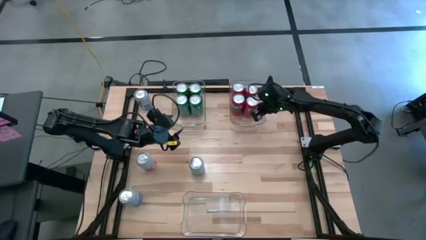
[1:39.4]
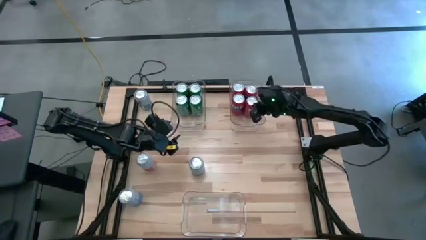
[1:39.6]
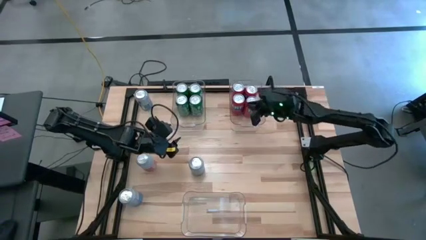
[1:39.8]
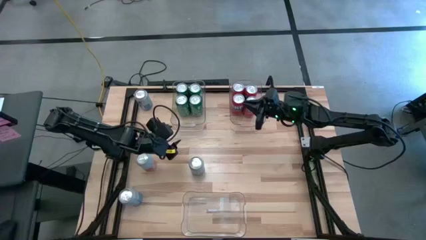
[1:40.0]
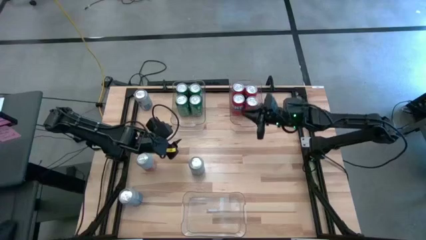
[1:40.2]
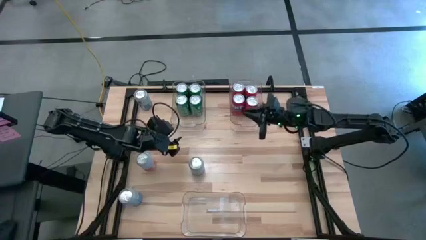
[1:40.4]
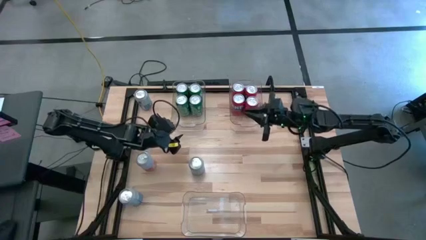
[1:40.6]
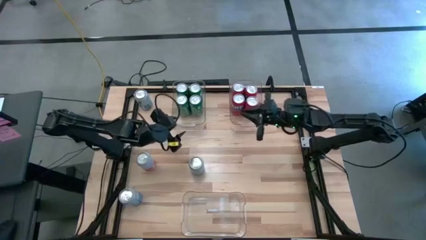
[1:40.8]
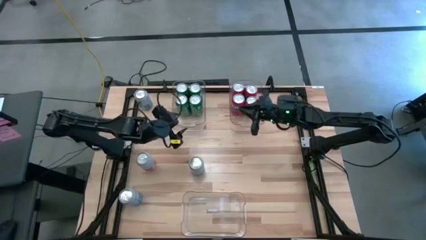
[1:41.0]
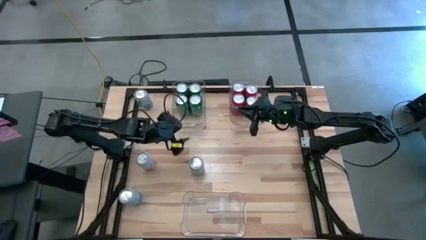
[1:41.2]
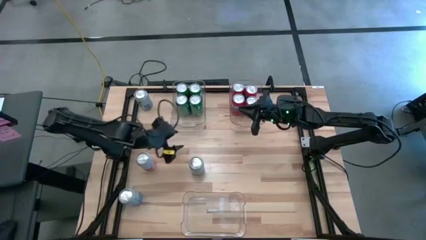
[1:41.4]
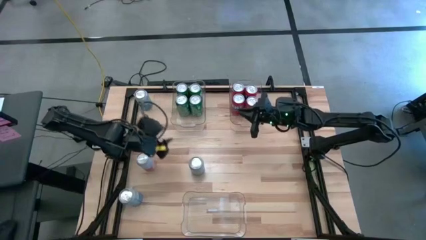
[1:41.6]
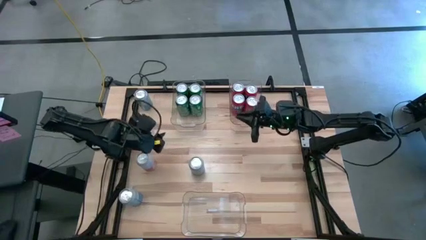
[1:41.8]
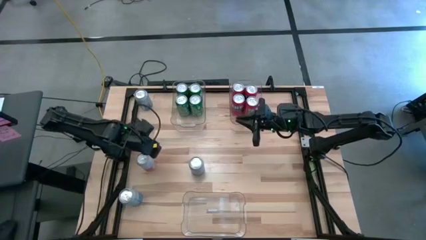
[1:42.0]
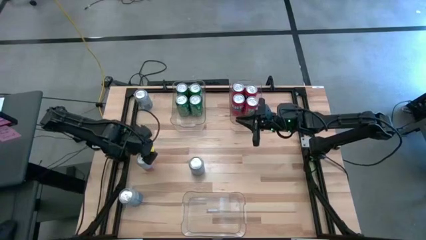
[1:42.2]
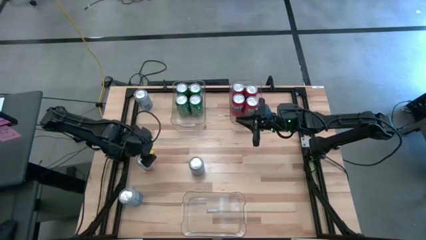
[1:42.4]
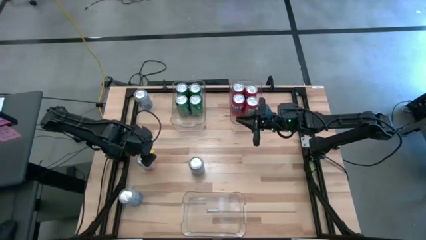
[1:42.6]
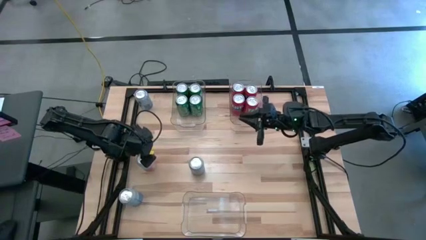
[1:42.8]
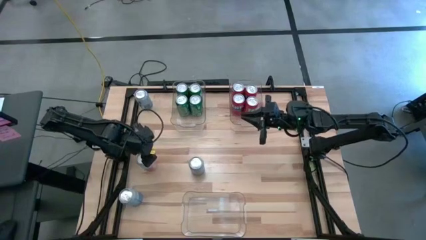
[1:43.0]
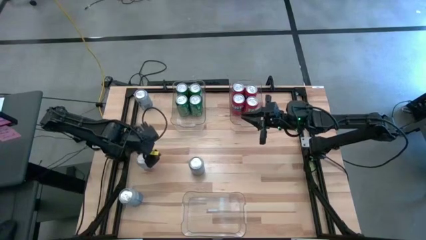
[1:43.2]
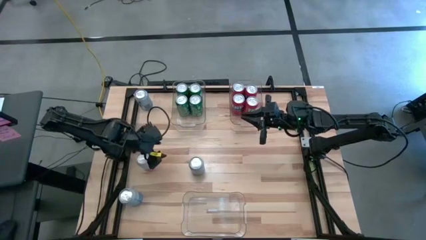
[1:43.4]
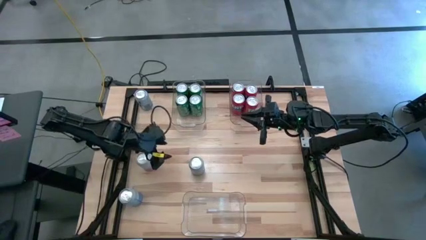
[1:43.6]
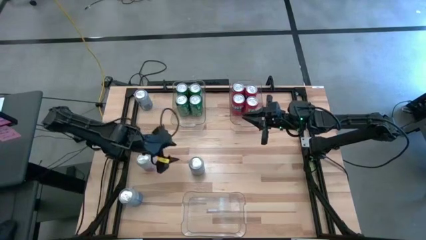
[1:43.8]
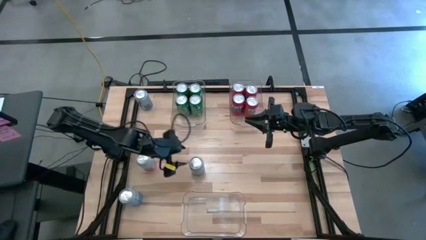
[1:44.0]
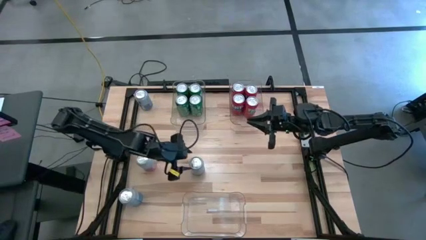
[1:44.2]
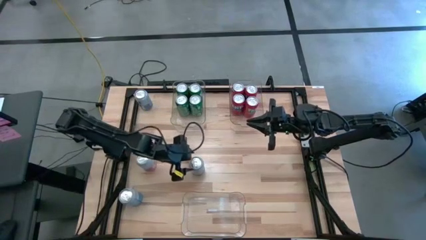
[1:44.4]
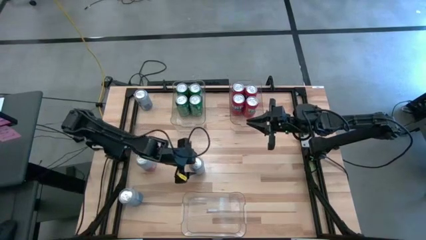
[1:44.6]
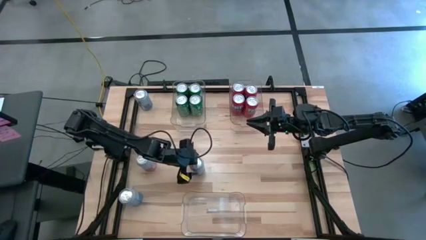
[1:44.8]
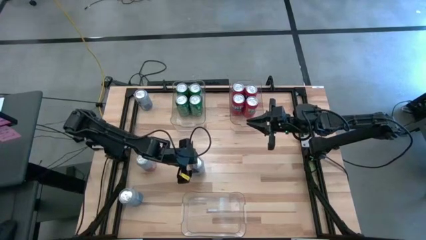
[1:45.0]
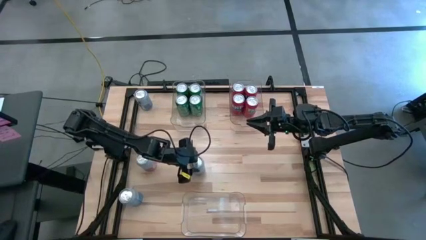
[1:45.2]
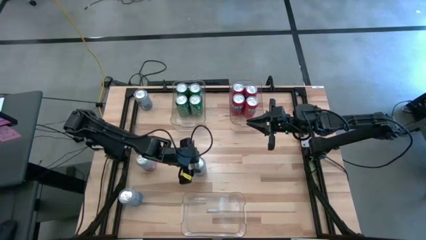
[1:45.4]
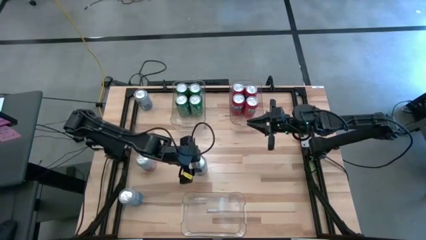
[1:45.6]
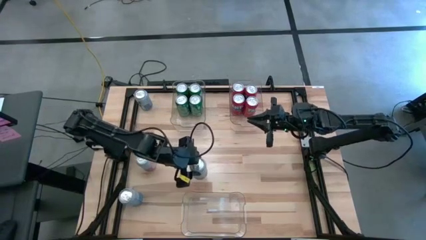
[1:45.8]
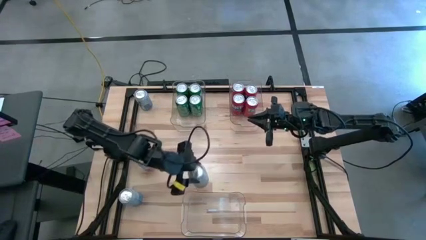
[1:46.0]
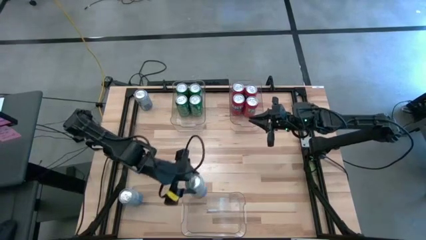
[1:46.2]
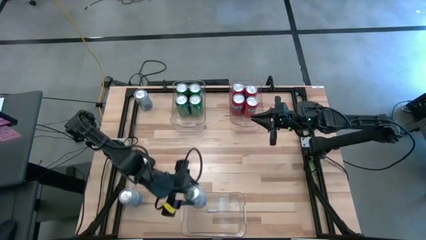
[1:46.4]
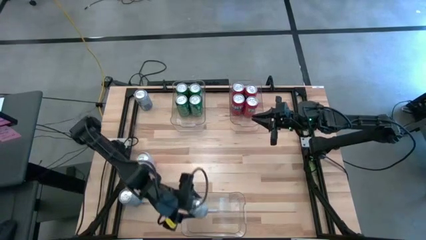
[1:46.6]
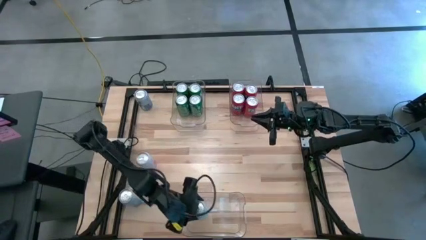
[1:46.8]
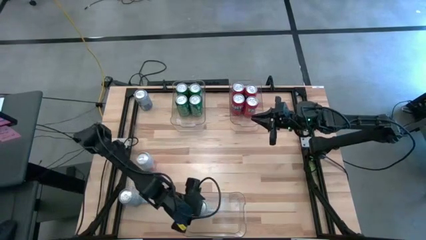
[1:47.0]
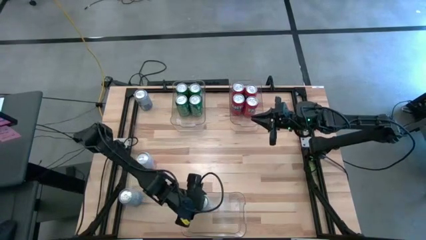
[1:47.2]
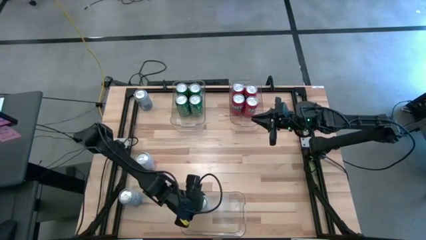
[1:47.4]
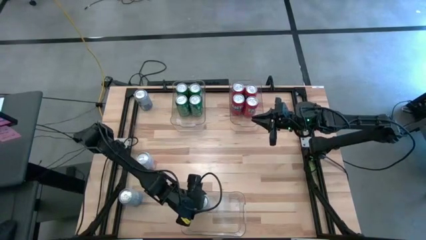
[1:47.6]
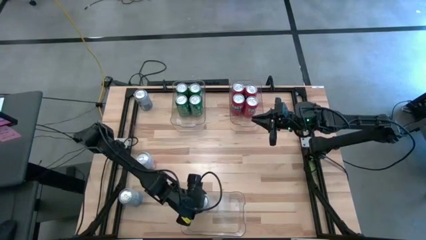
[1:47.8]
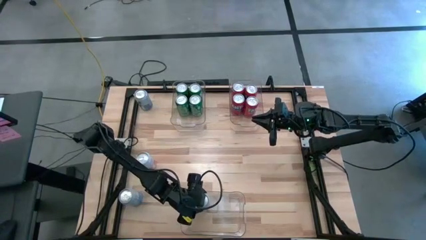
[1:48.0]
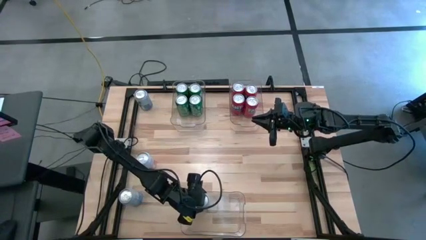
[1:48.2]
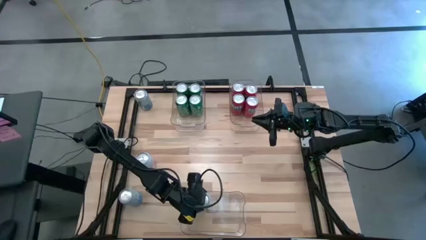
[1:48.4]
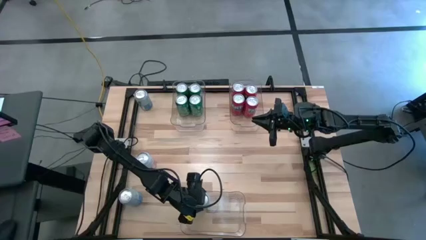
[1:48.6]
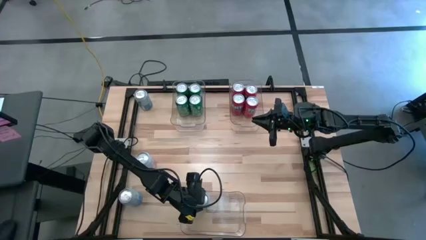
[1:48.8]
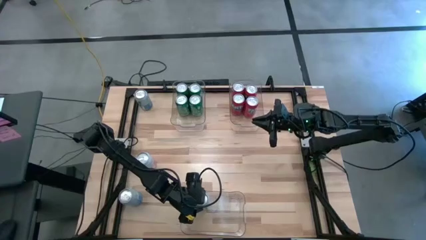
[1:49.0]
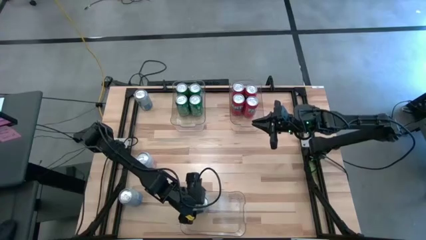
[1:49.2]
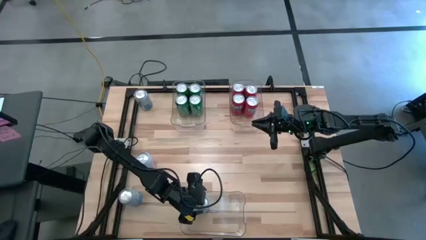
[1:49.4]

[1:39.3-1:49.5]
Task: Sort soda cans
Put the blue soda can into the bottom transparent bin

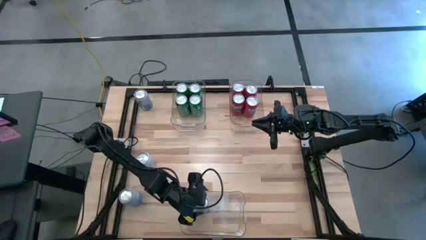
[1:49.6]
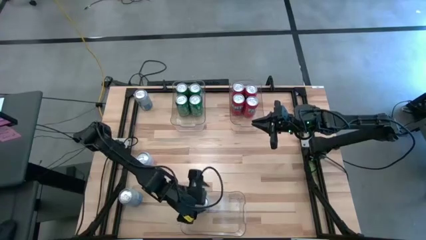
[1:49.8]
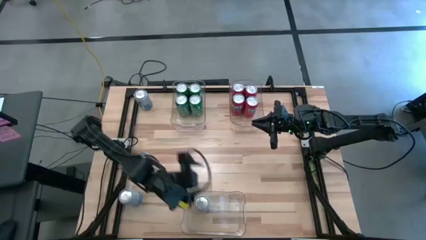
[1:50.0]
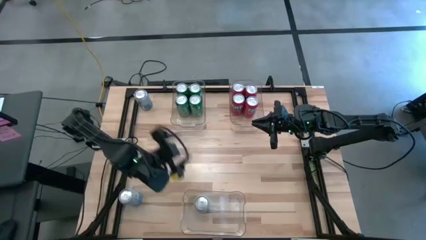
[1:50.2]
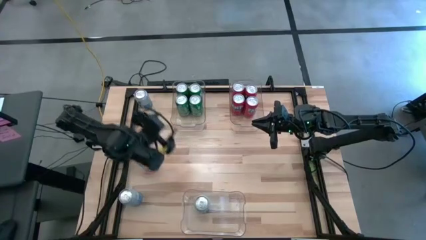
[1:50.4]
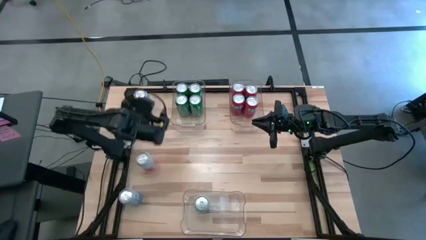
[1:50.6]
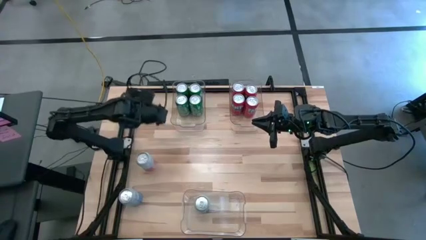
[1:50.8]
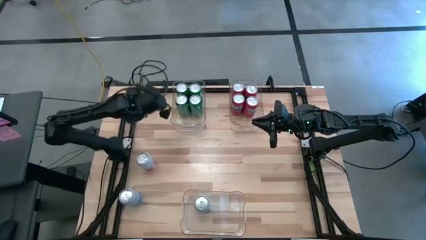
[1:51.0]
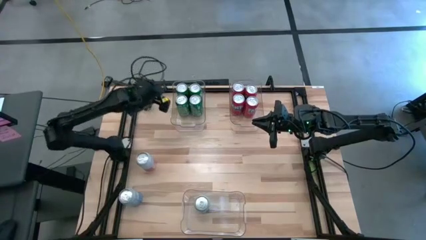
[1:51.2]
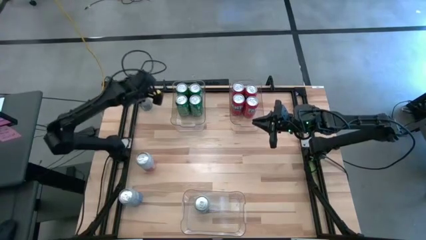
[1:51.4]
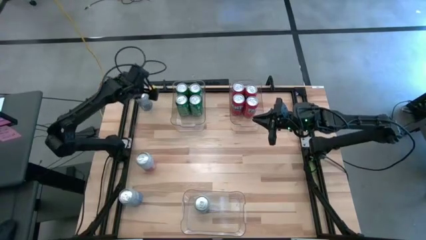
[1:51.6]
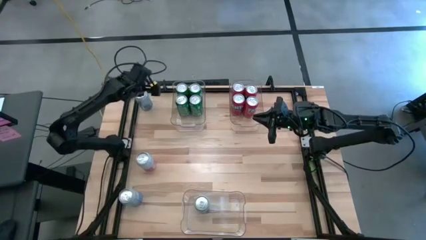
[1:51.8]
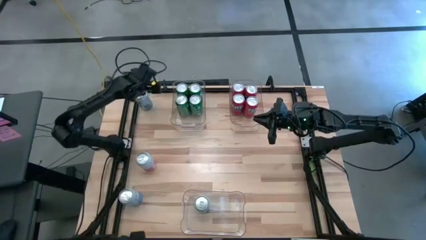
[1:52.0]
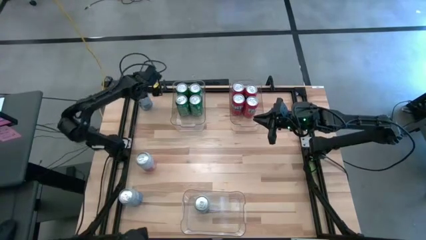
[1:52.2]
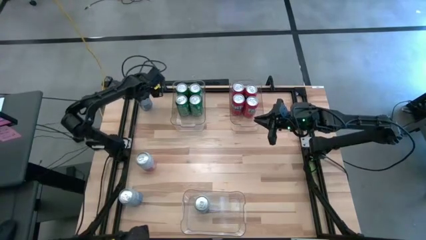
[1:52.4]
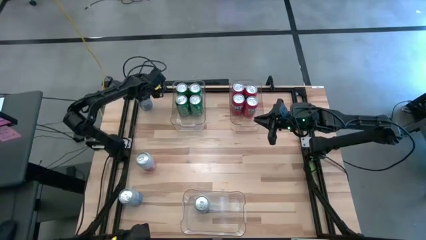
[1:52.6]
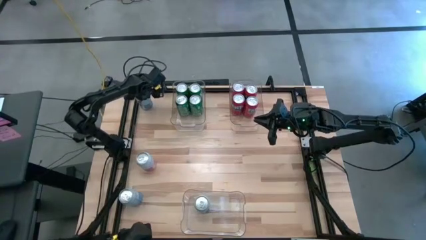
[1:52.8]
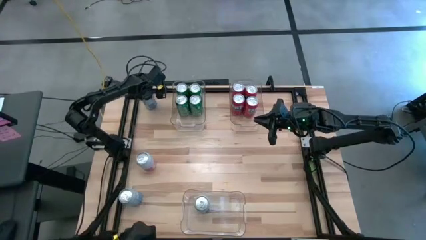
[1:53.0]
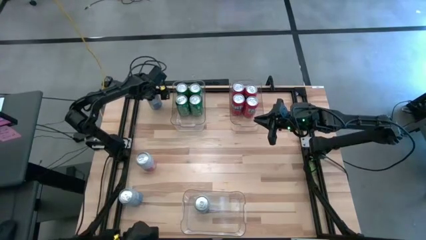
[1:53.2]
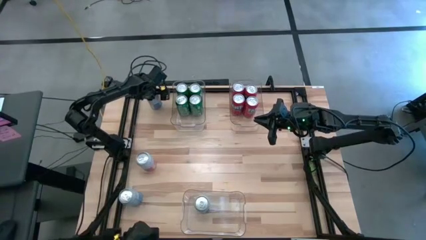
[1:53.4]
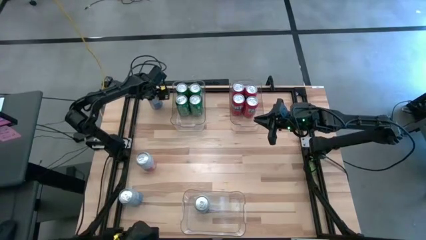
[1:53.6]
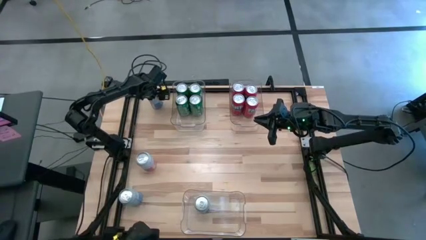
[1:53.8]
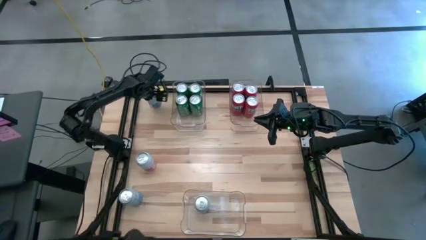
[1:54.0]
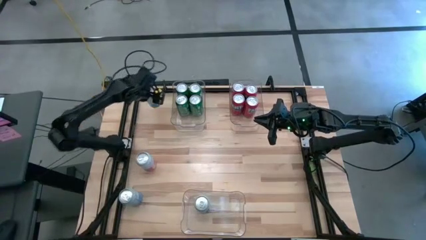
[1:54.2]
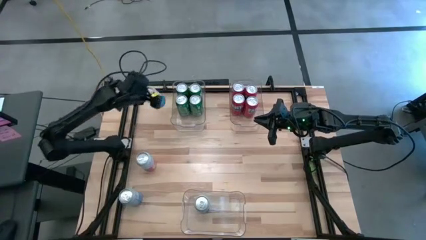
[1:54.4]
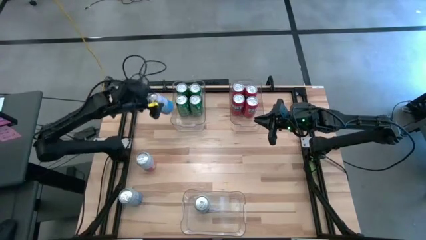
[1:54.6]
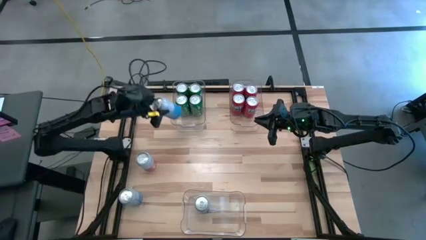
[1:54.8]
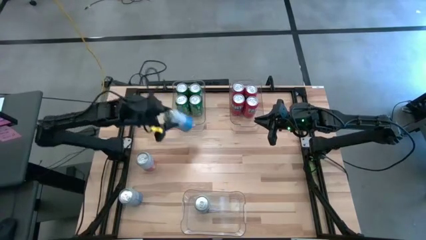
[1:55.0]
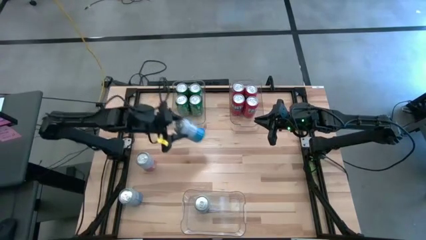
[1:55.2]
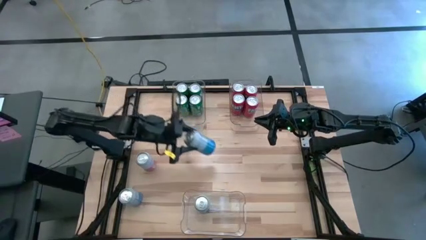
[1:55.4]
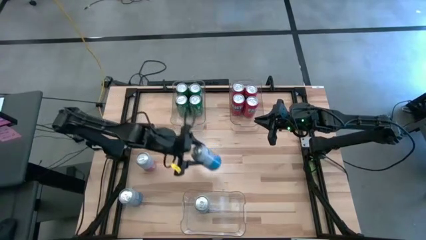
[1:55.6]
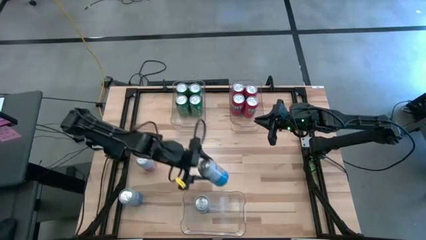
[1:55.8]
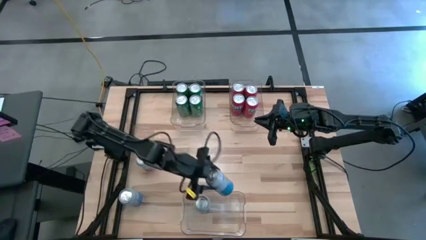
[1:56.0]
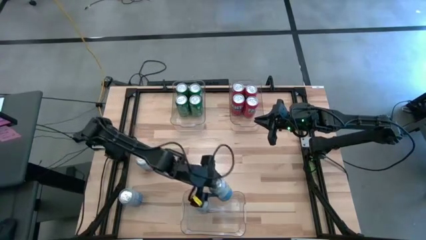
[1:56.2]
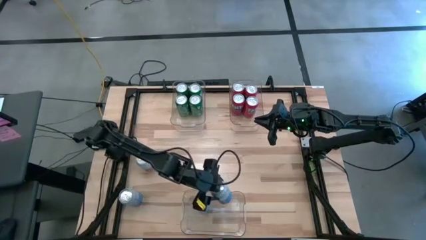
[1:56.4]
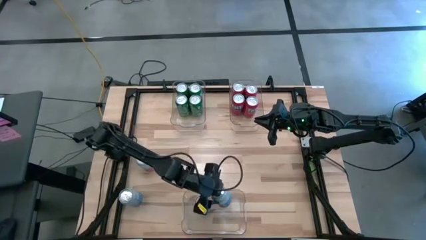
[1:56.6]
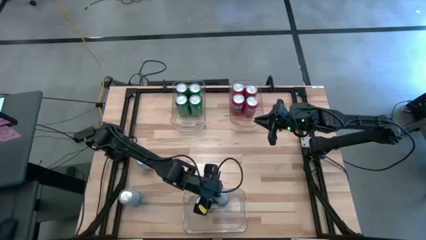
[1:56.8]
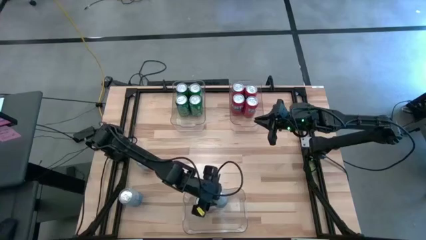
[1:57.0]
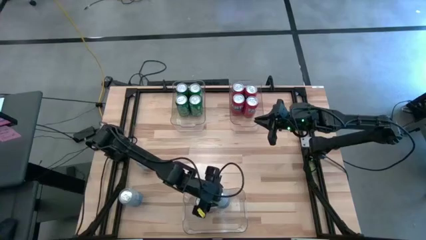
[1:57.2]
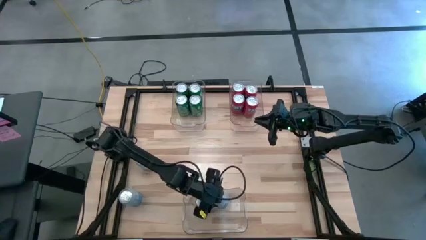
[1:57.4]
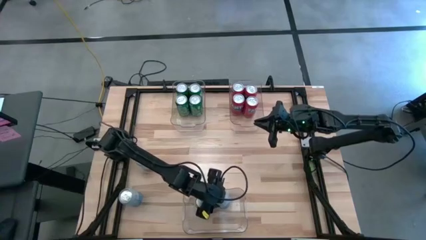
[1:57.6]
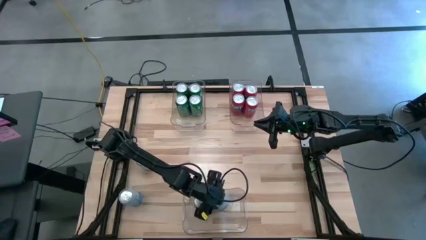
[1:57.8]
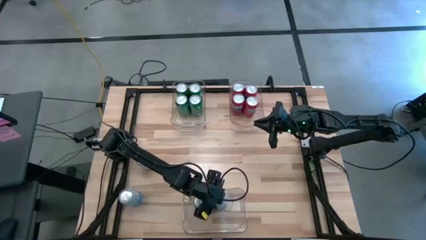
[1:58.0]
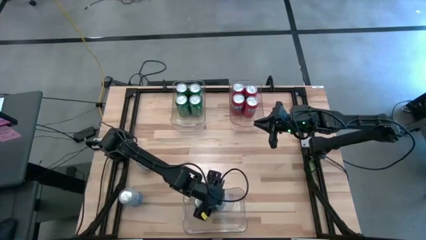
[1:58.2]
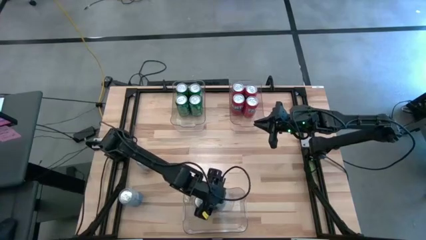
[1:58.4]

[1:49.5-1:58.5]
Put the blue soda can into the bottom transparent bin
